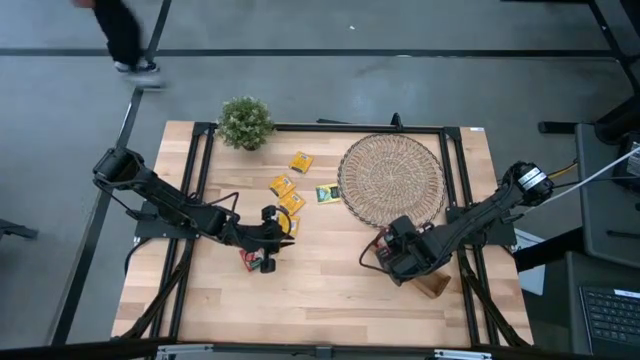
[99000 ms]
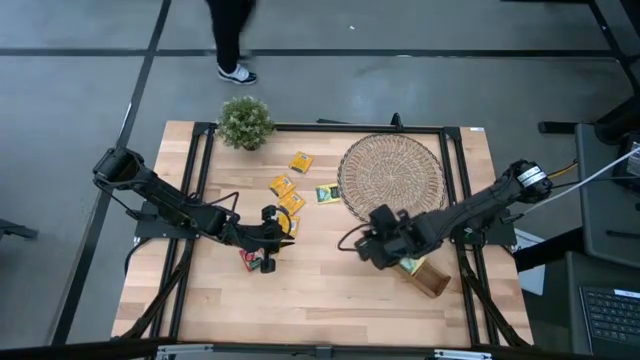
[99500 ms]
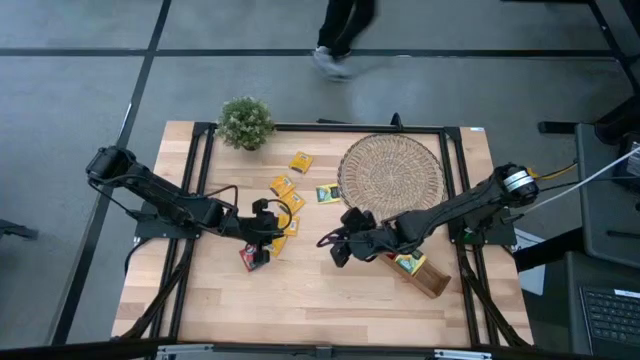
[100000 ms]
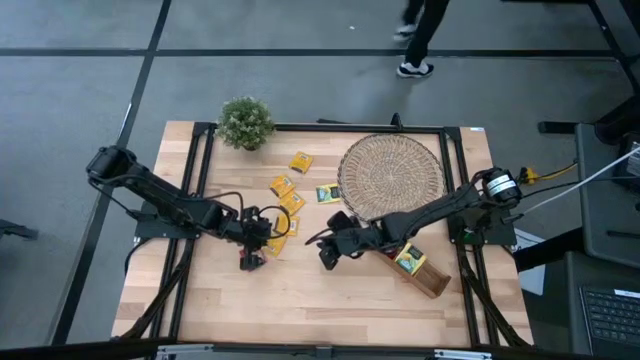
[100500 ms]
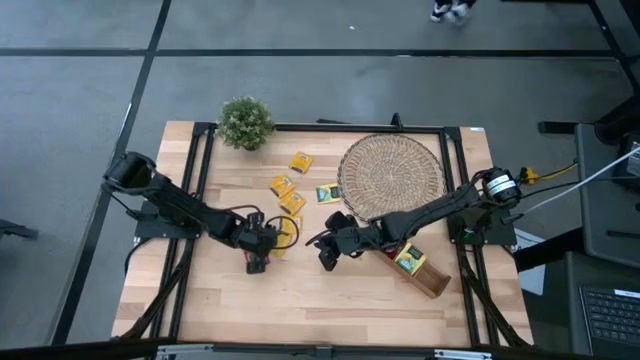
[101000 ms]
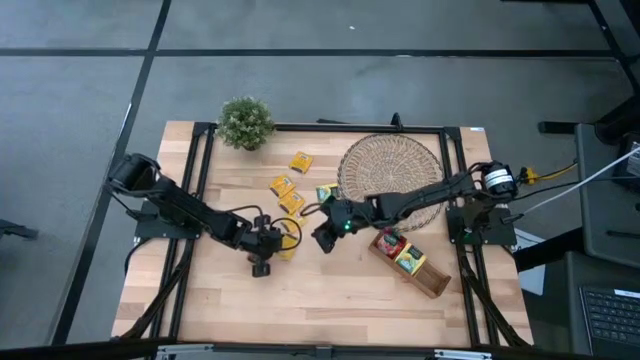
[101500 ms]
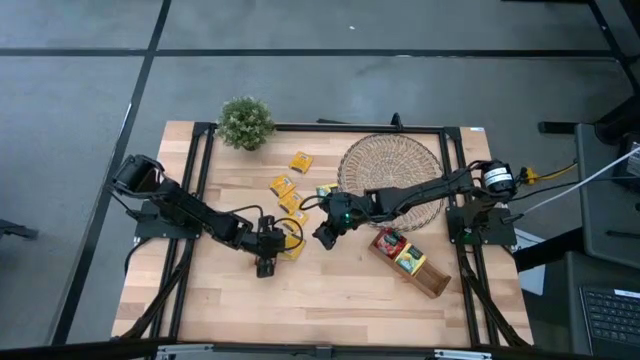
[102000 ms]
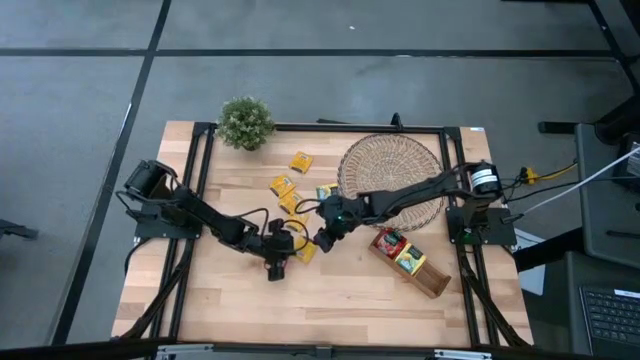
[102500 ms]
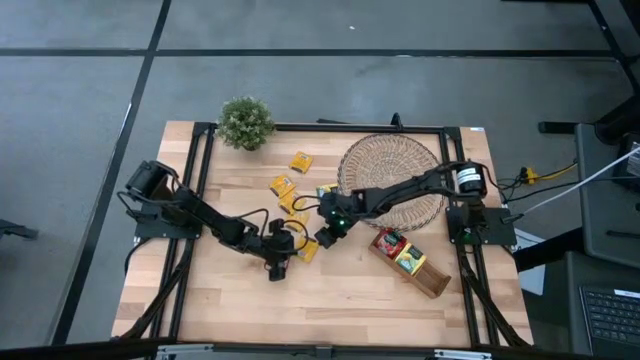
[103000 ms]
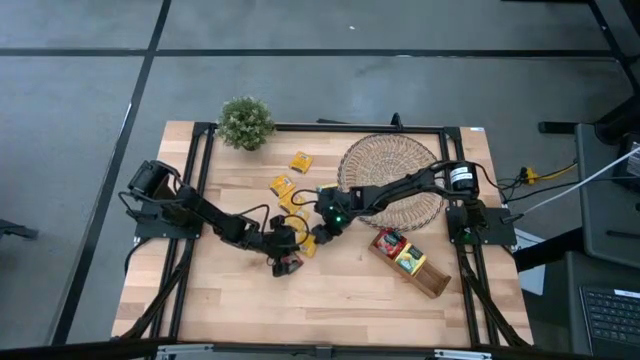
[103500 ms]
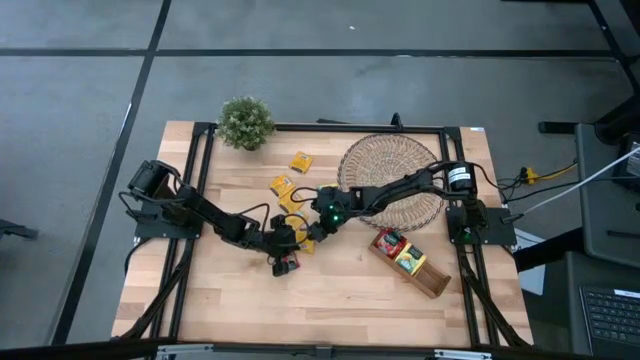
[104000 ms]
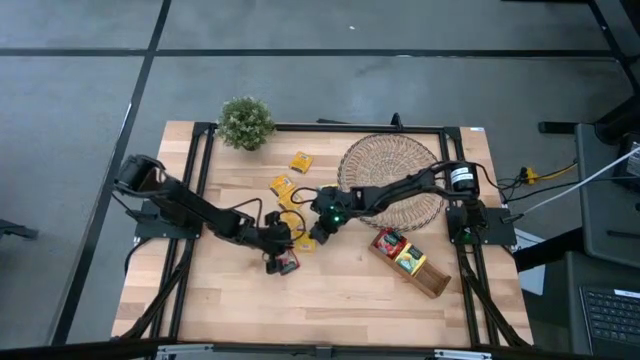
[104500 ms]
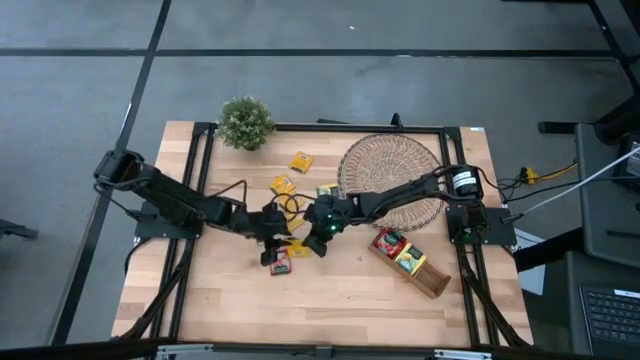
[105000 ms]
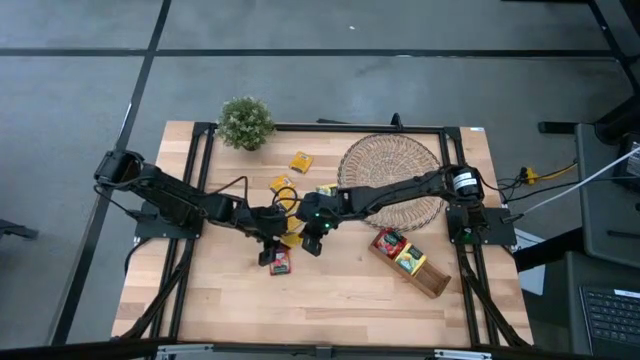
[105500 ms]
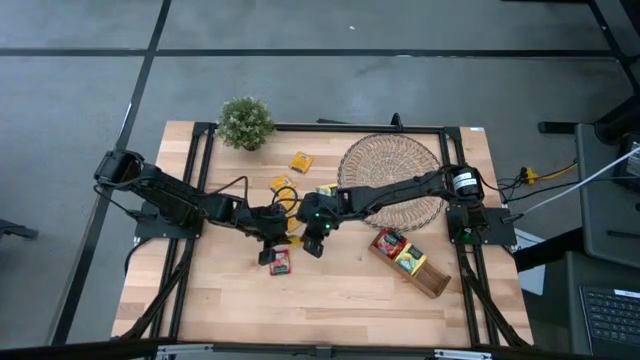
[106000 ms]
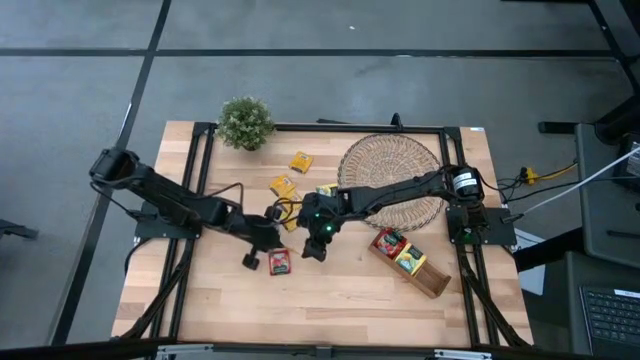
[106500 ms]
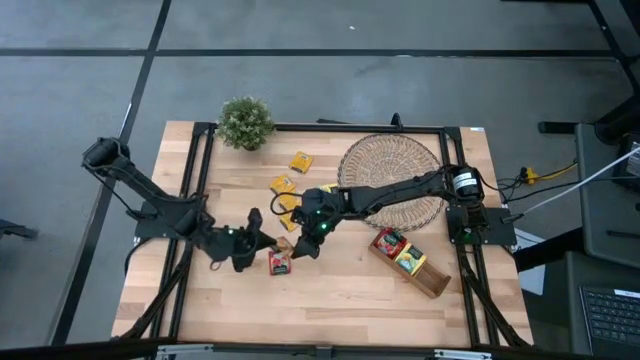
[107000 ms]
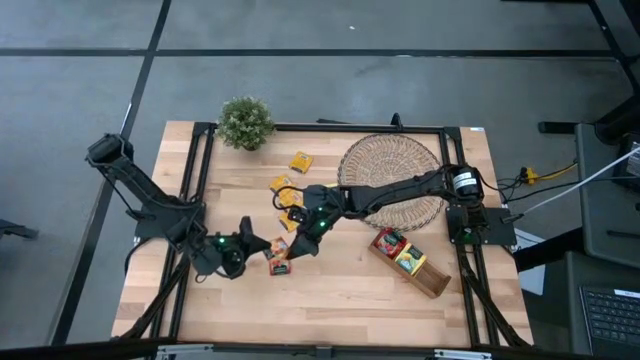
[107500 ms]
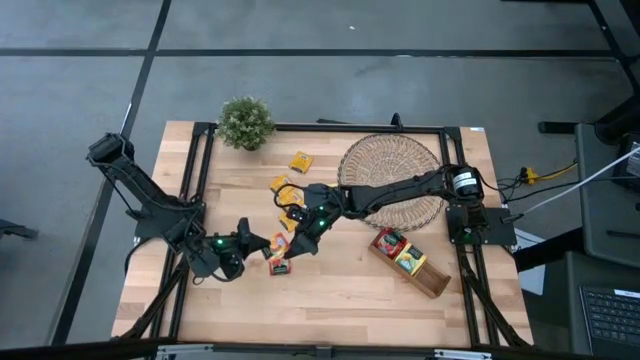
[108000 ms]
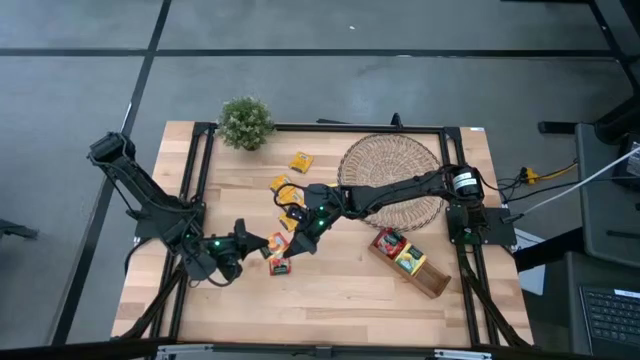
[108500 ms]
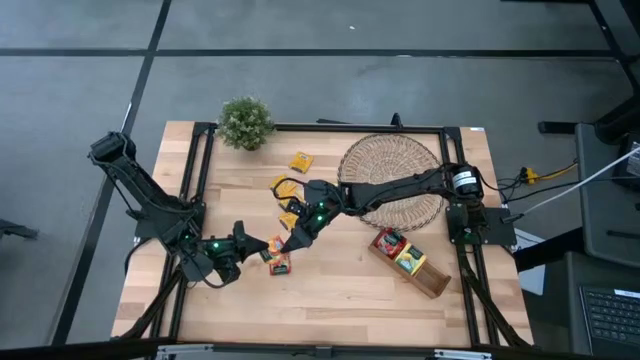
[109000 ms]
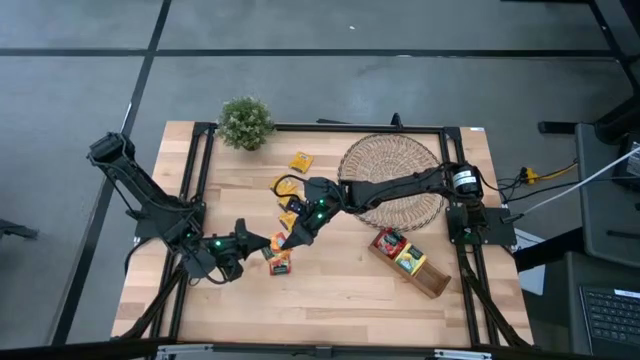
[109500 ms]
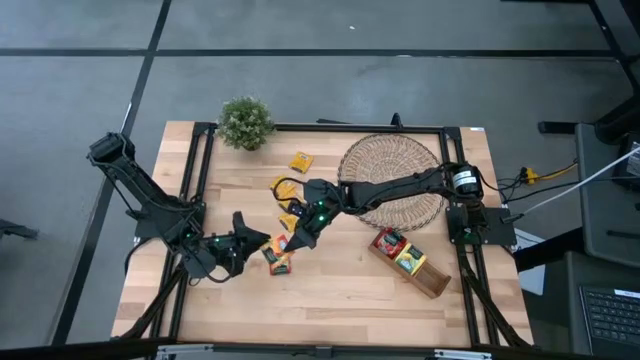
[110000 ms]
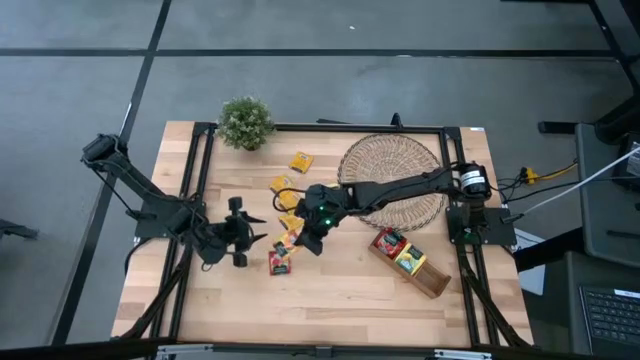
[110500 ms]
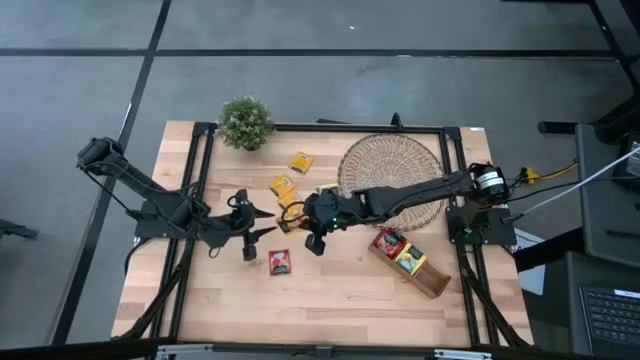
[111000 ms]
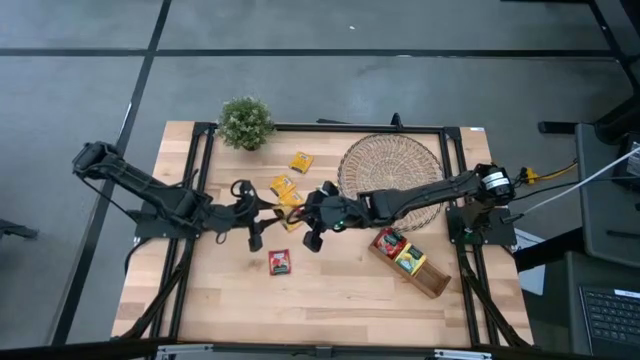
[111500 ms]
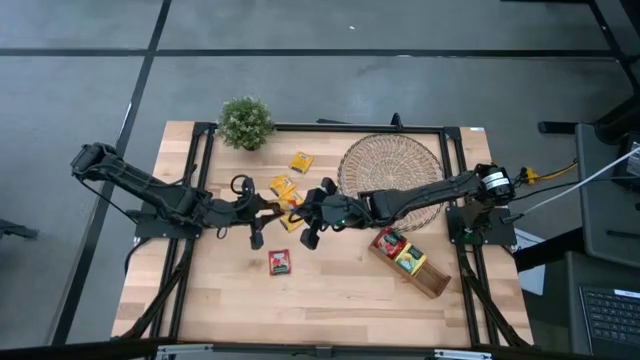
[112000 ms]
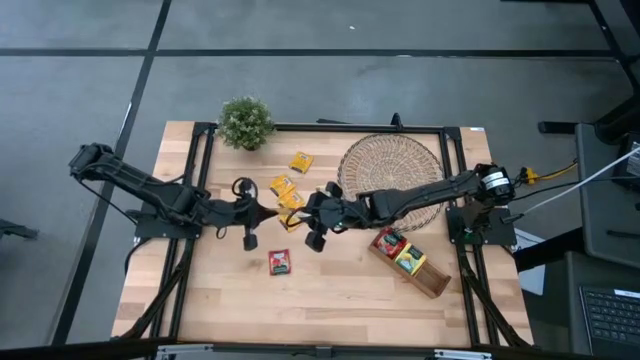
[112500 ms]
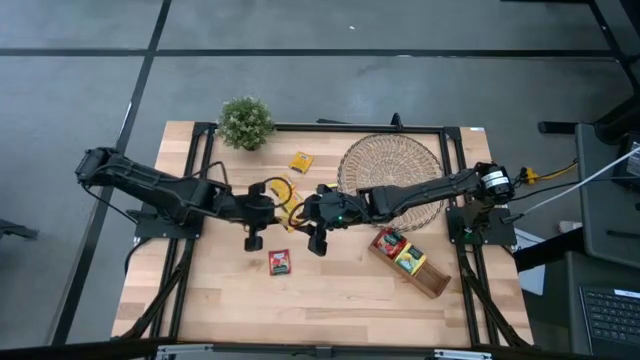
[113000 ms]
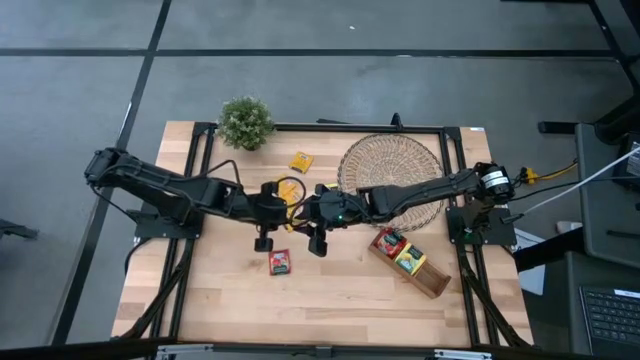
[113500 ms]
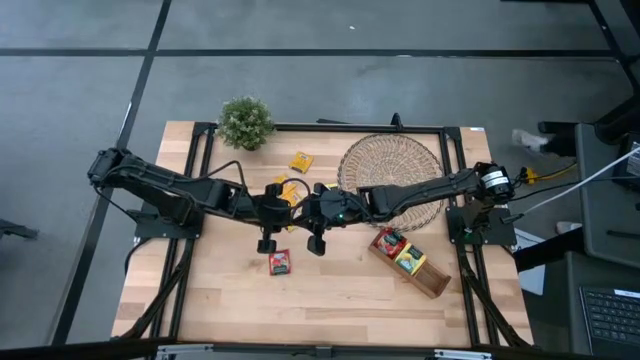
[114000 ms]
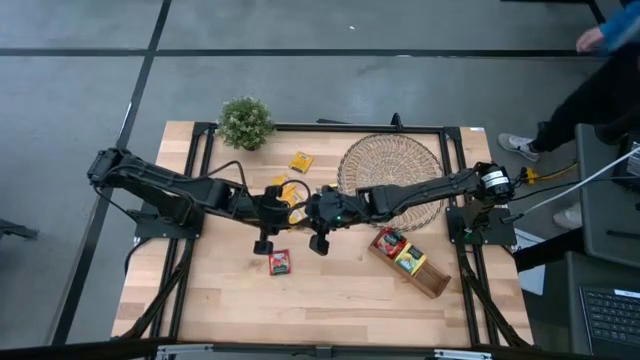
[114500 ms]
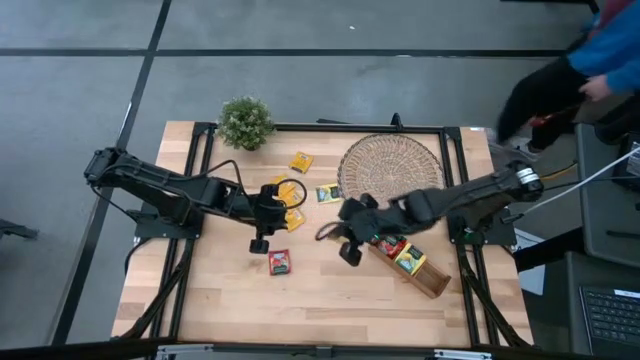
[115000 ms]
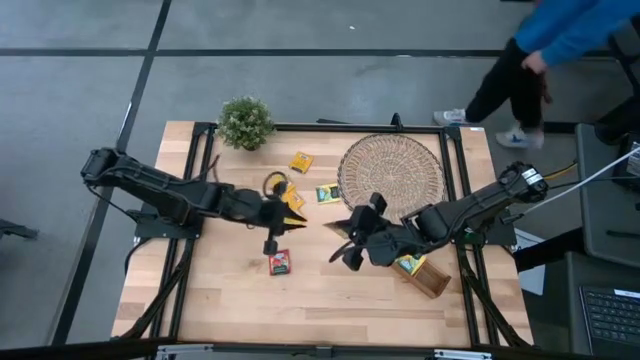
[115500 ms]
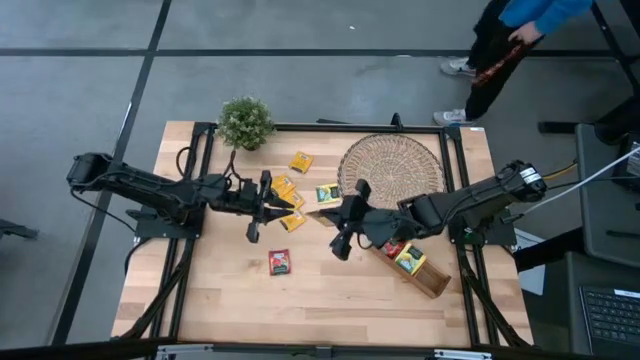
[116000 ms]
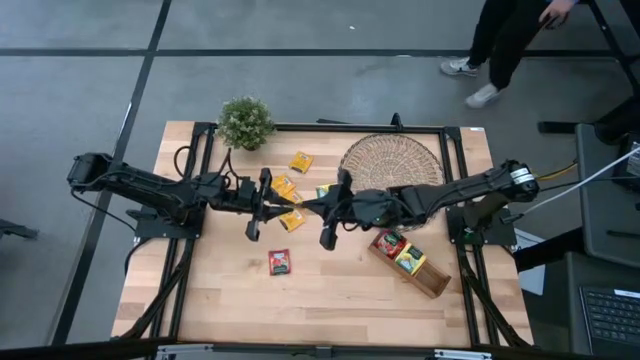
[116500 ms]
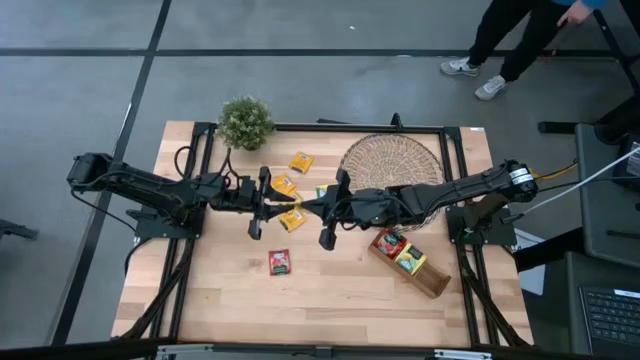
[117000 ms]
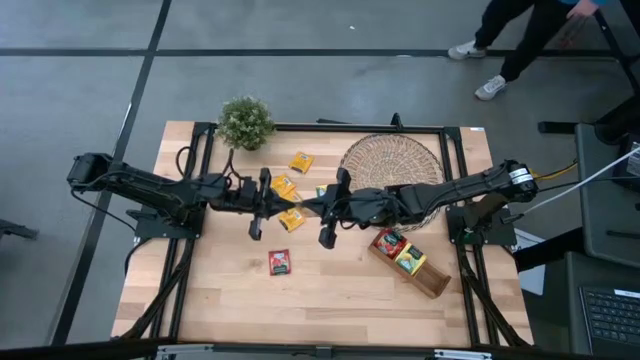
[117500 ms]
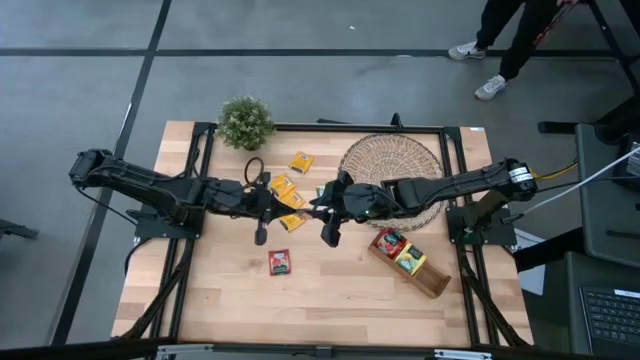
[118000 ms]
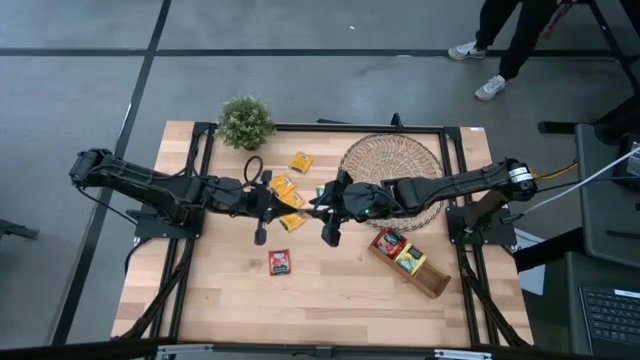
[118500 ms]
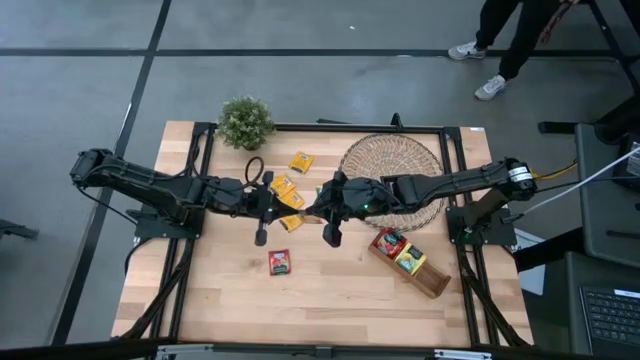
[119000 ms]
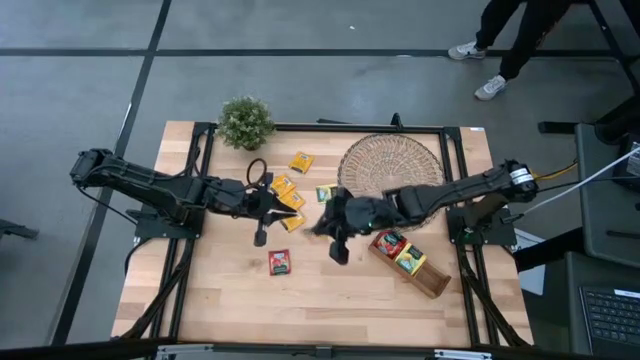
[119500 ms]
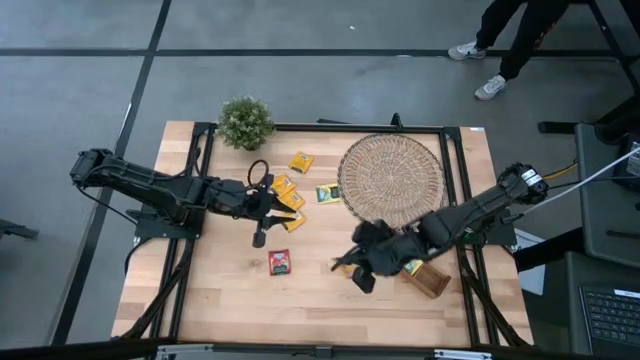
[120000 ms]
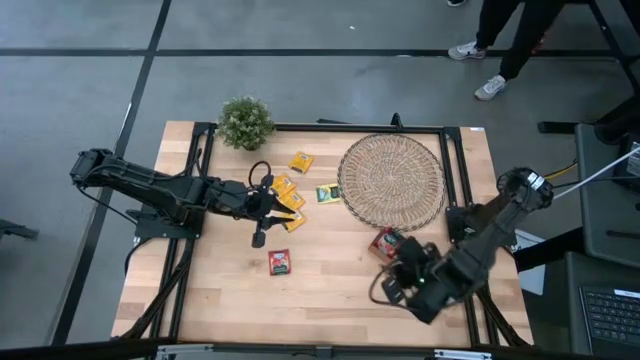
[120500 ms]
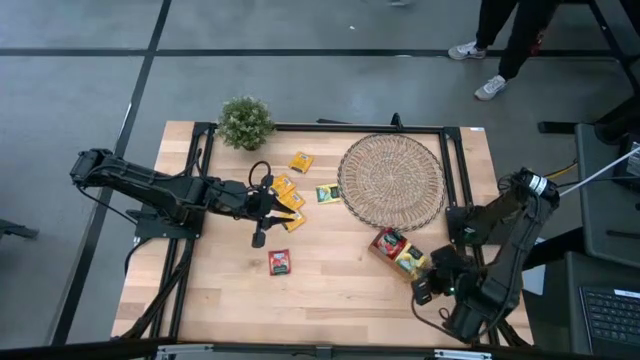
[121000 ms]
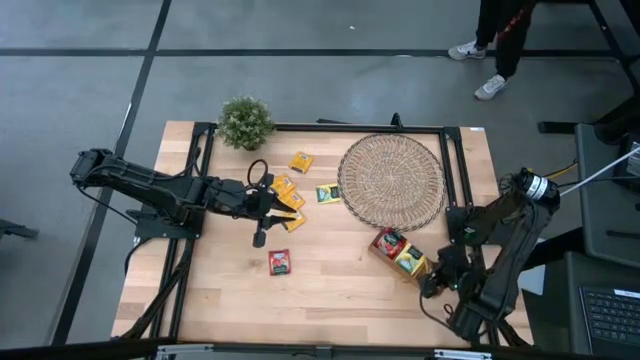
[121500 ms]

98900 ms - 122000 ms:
Task: Pick & Place Tea
Put the orange tea bag into the right slot of the wooden organizer
